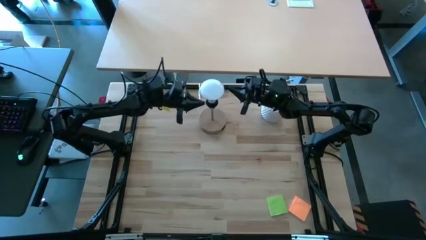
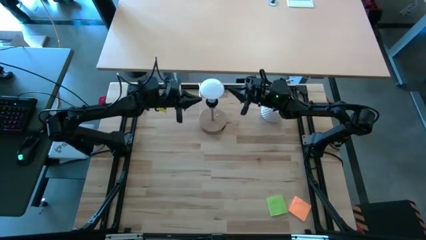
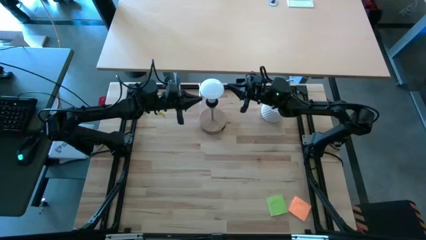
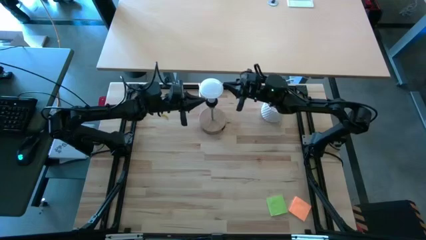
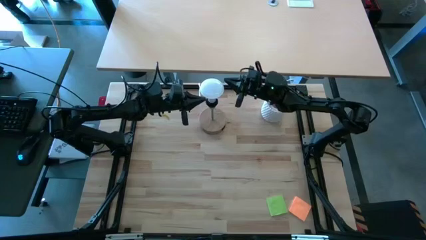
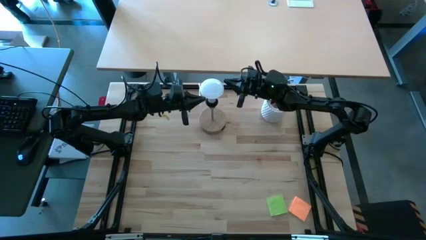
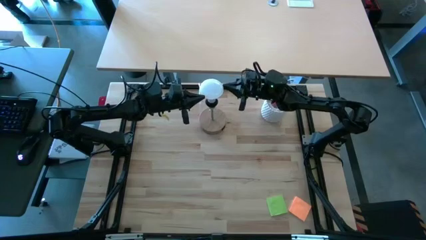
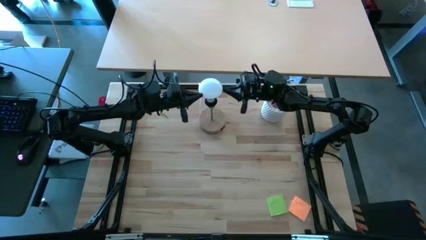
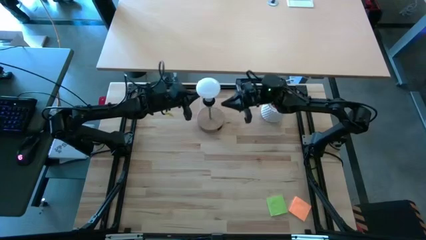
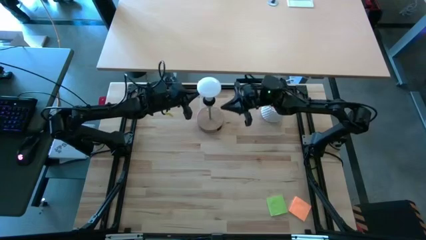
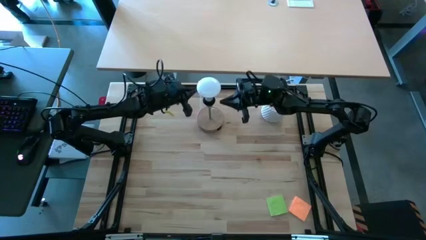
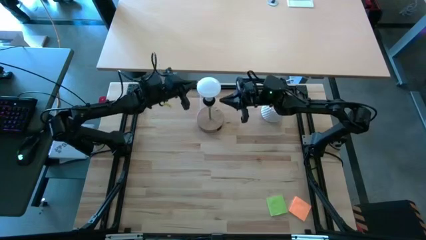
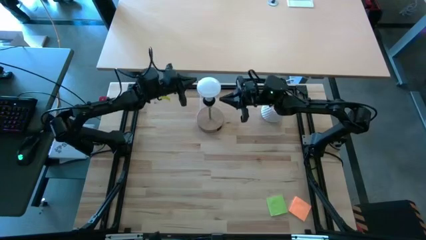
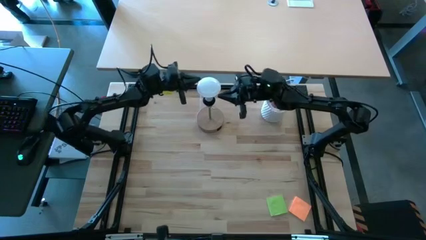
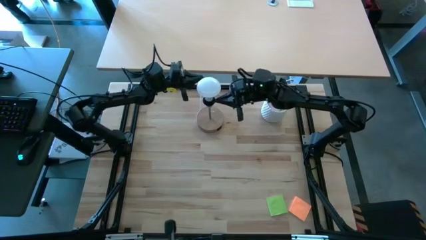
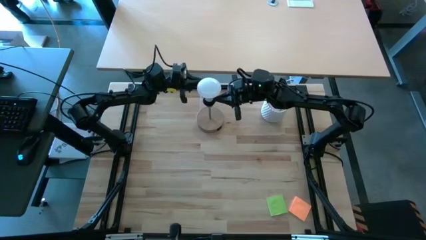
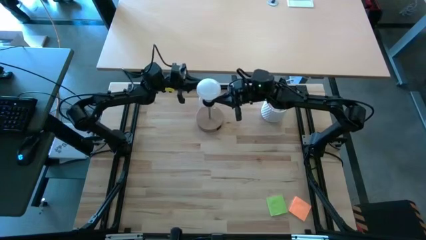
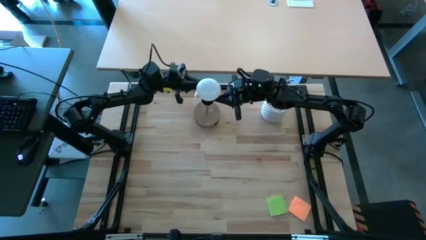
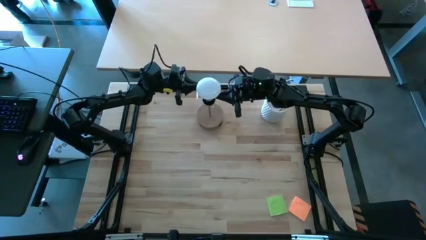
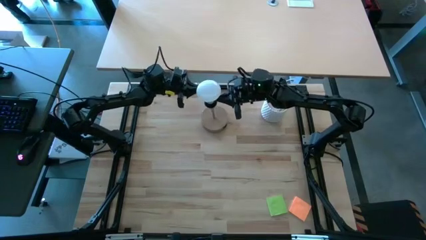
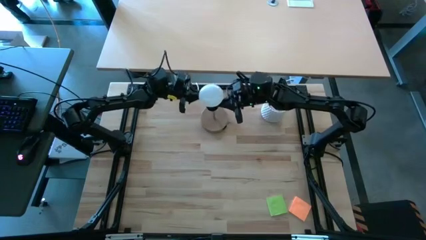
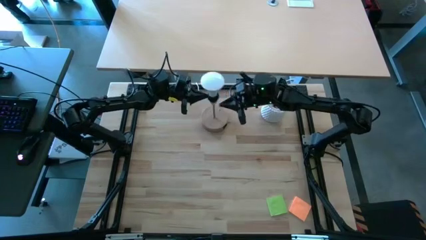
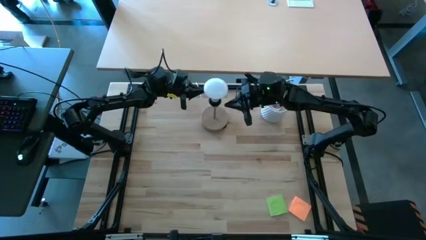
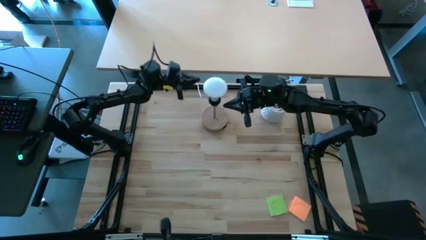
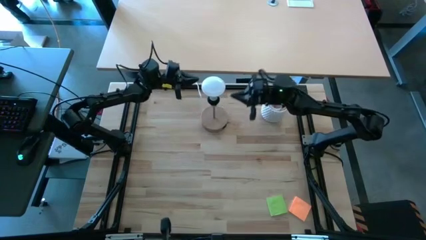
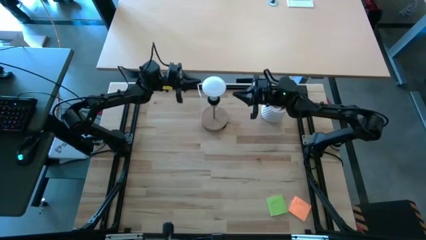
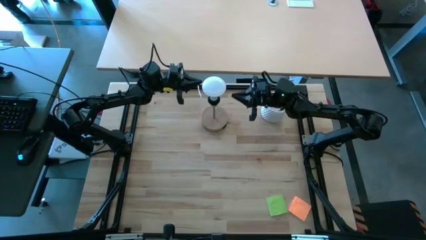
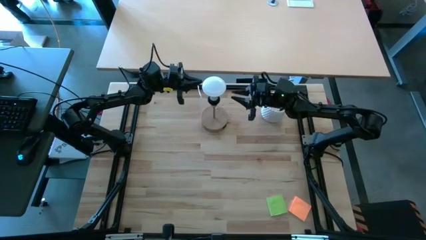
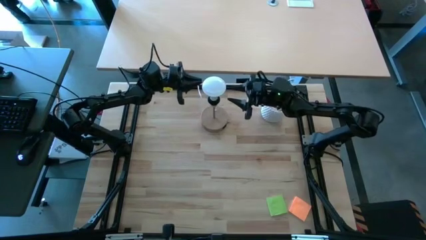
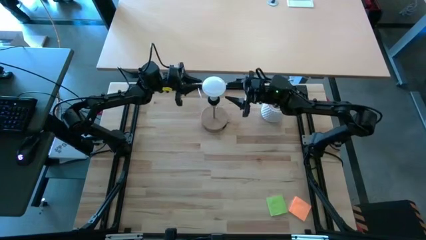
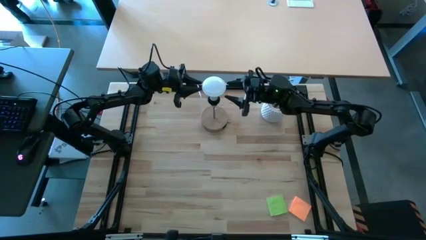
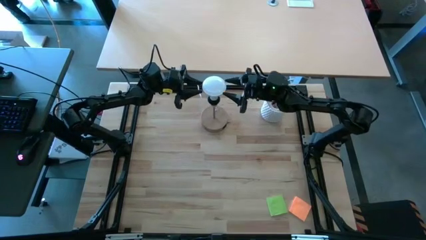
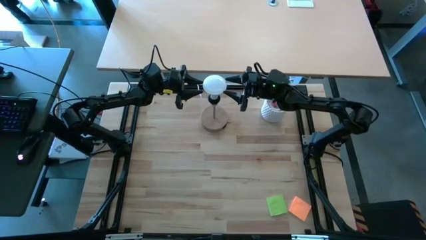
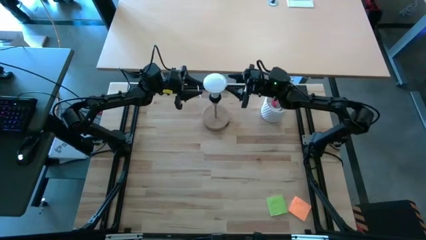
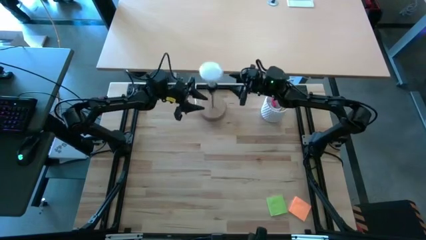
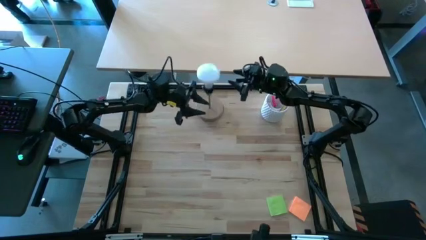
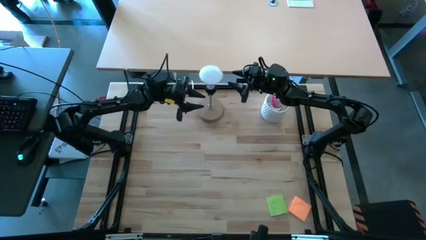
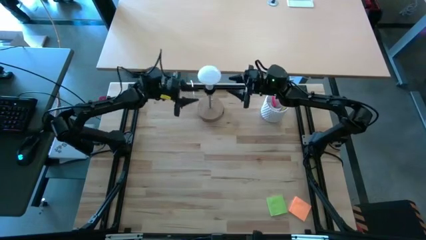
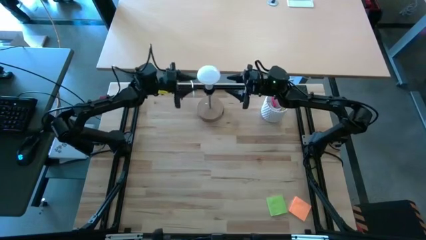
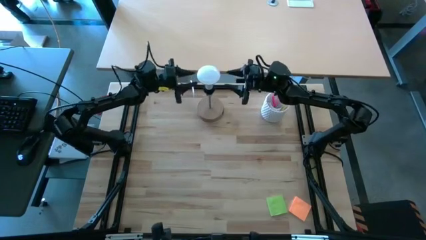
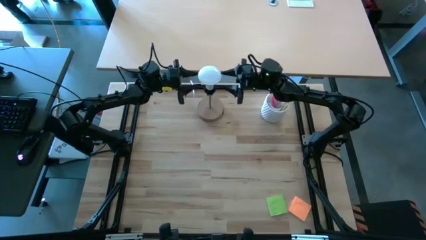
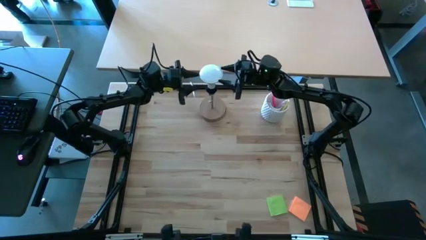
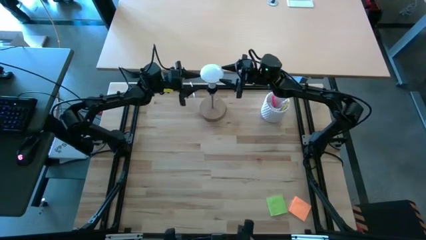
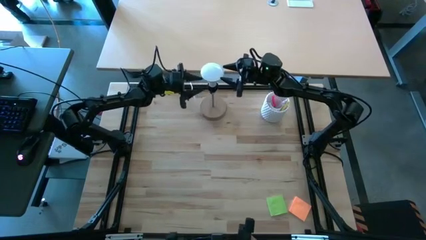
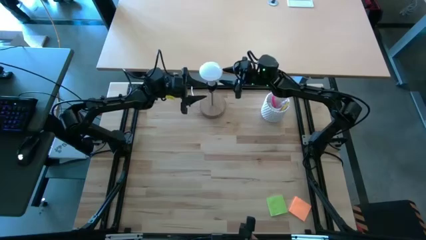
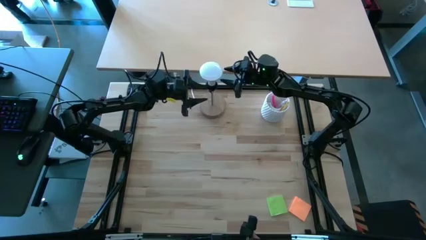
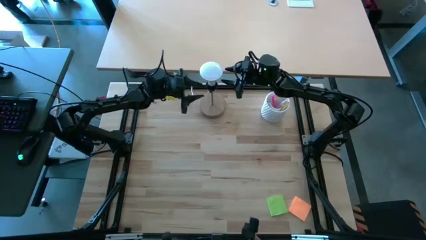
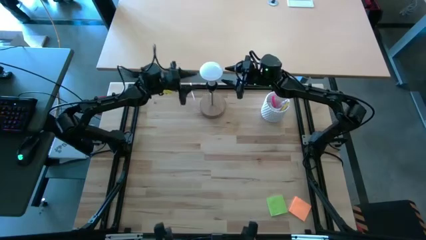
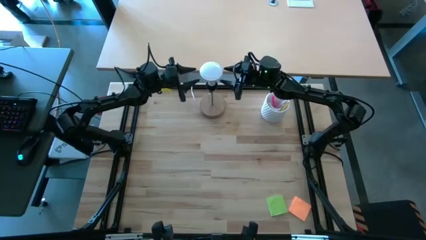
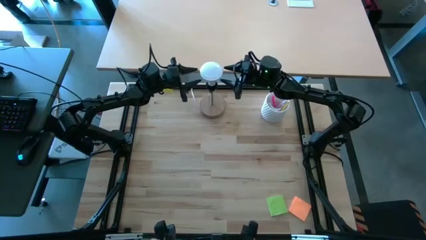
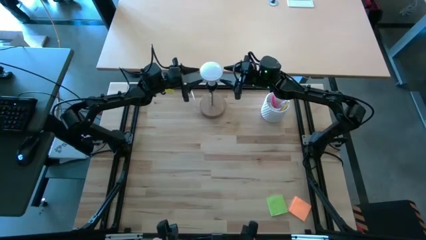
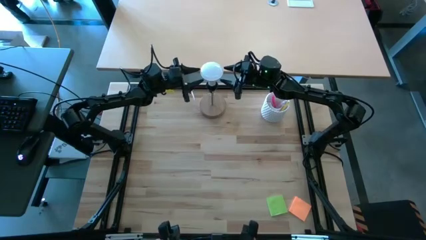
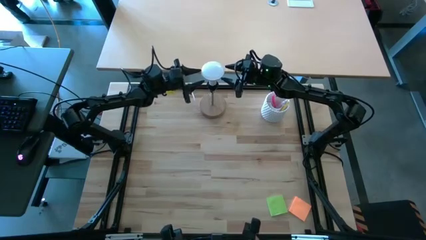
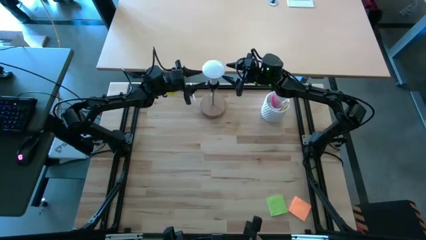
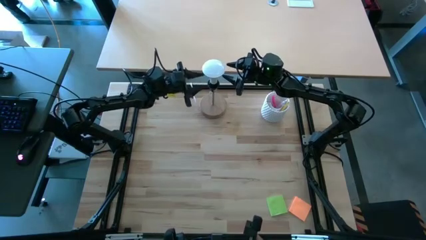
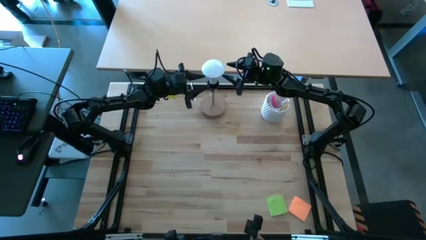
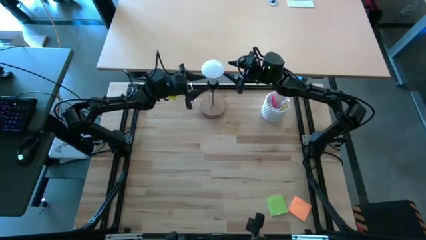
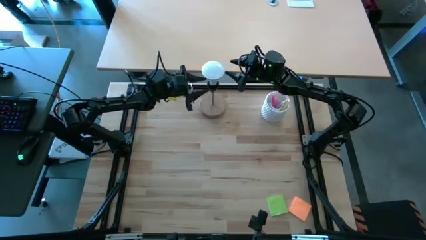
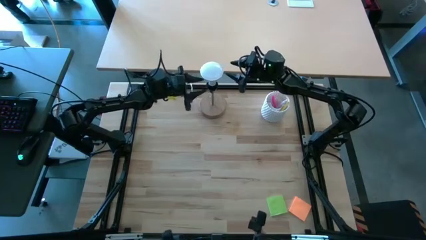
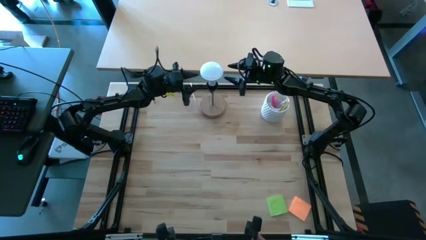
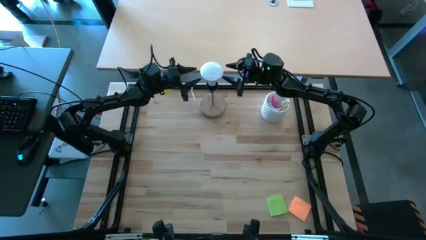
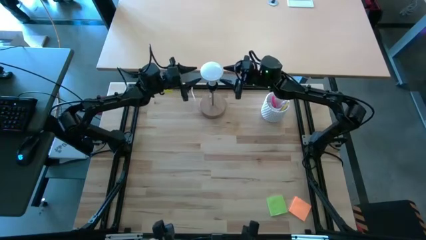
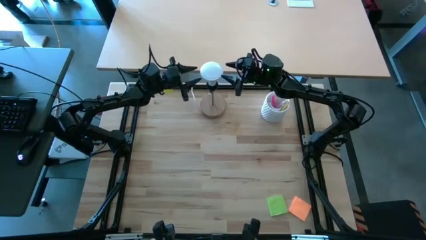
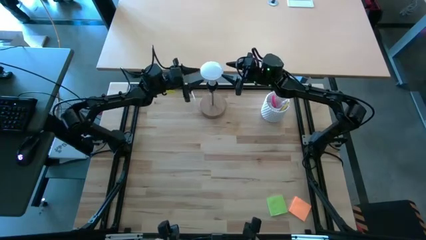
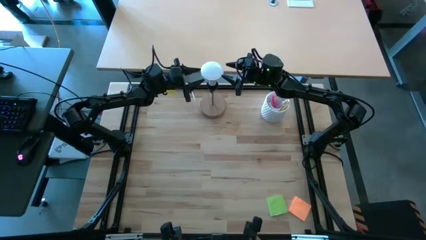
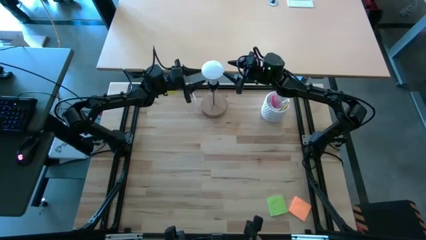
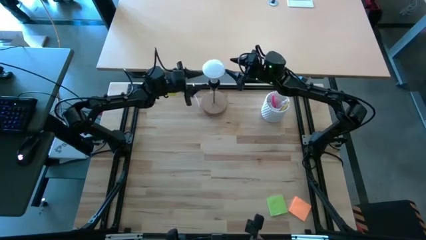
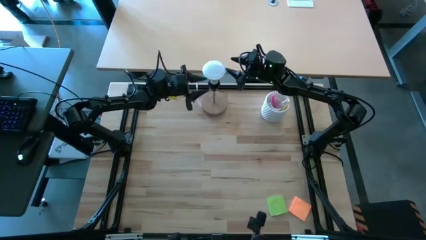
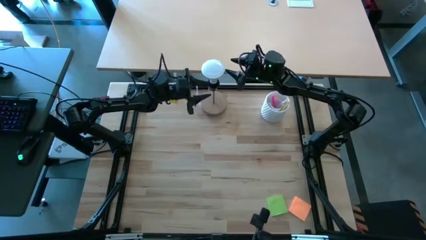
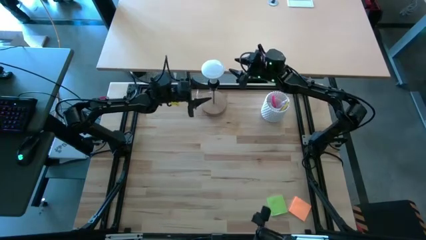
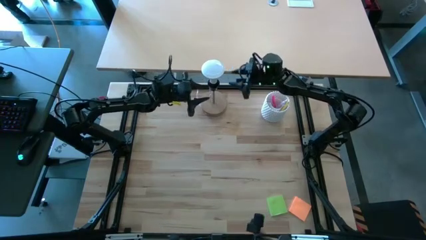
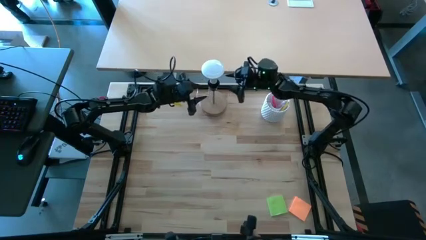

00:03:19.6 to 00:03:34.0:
Task: Screw lightbulb
Remove the lightbulb from the lamp

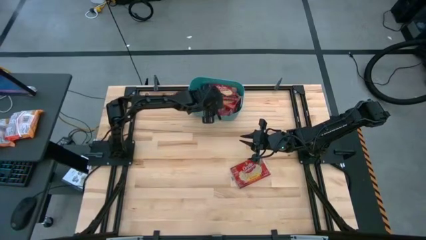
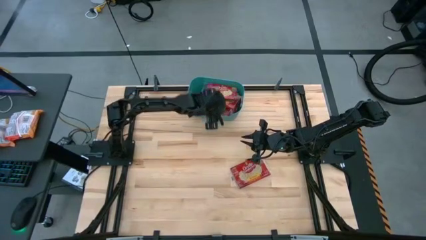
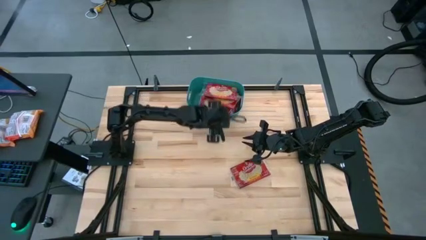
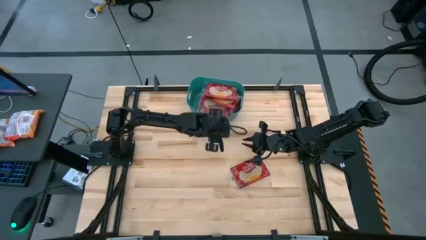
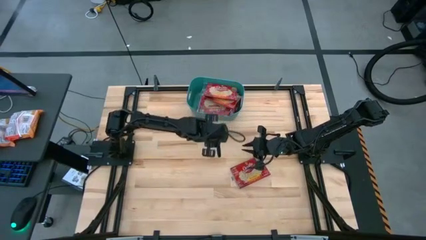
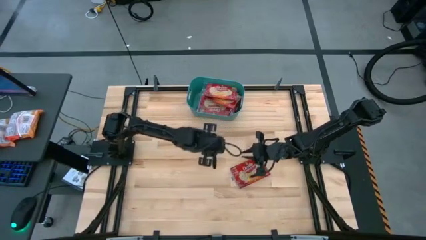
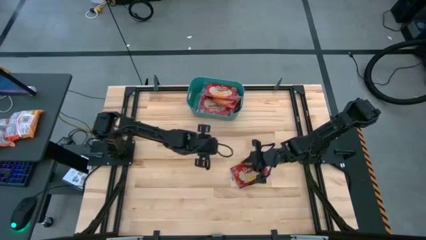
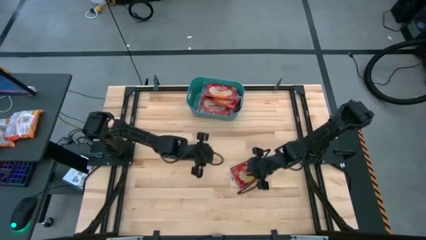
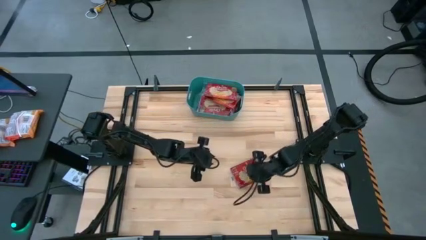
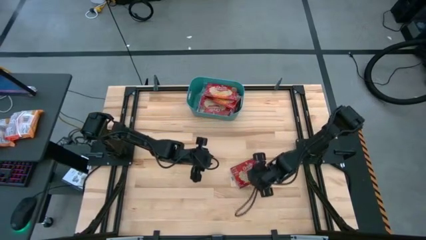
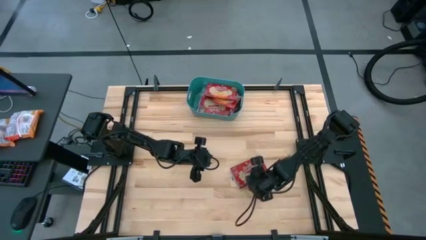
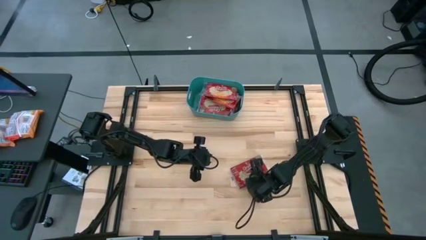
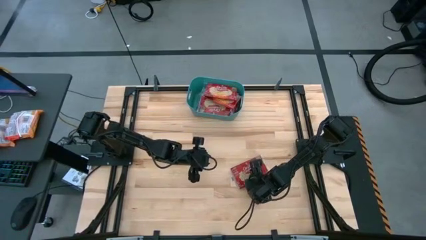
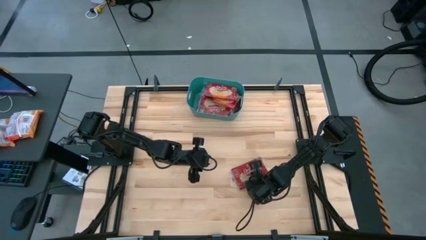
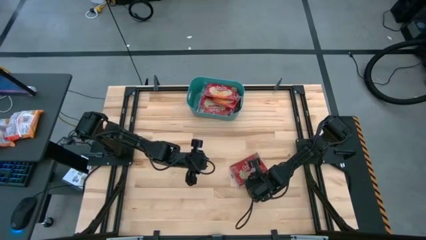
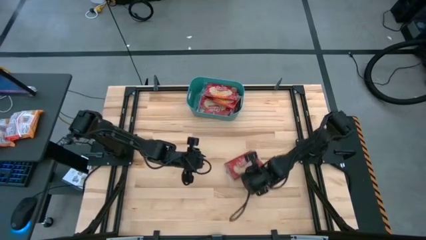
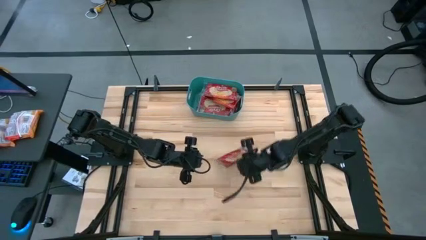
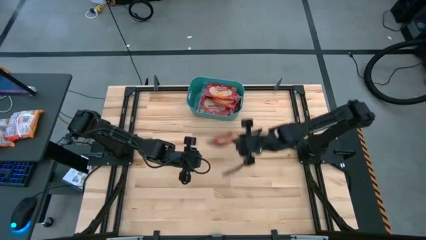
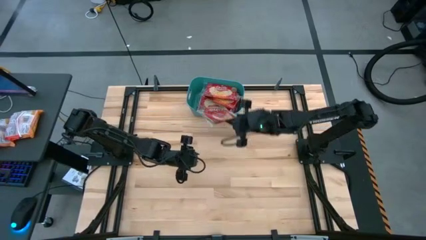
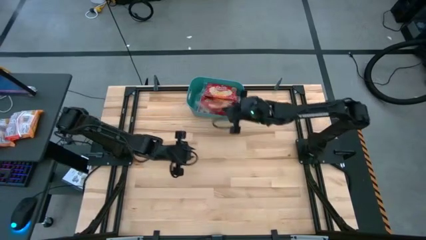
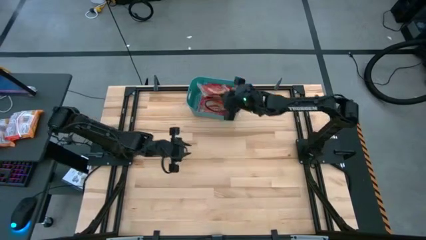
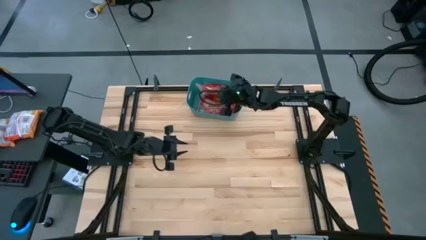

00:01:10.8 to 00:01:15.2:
Task: Sort popcorn bags into baskets
Put the red popcorn bag into the green bin
